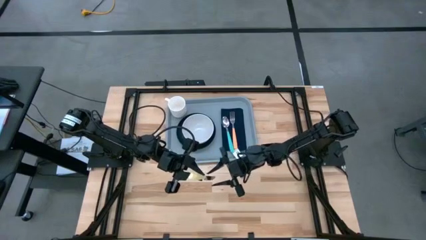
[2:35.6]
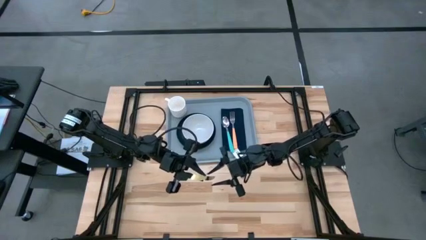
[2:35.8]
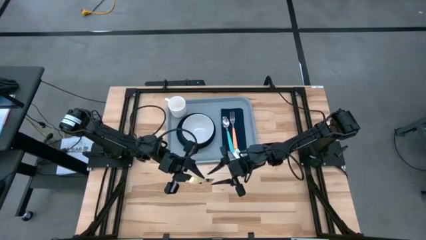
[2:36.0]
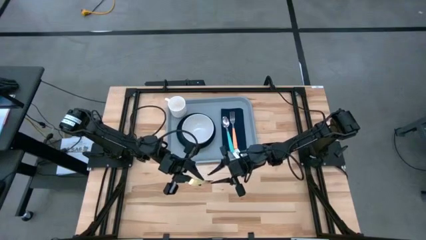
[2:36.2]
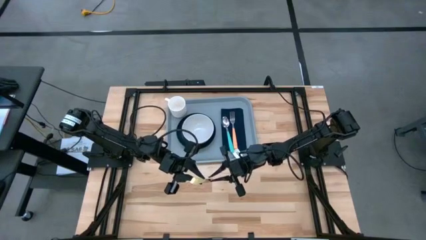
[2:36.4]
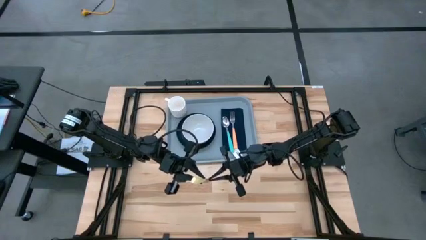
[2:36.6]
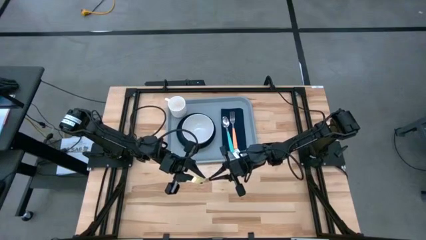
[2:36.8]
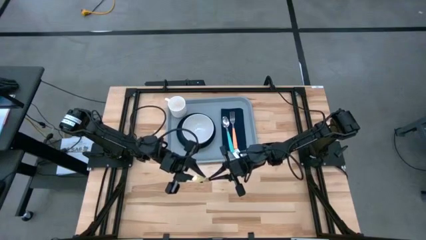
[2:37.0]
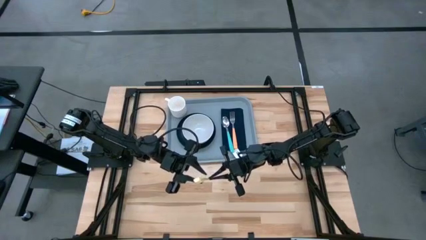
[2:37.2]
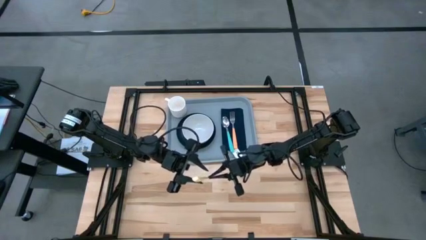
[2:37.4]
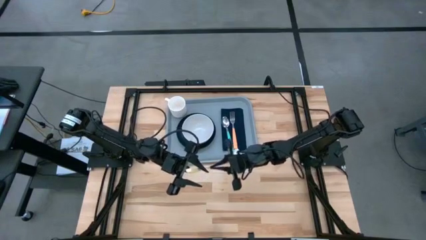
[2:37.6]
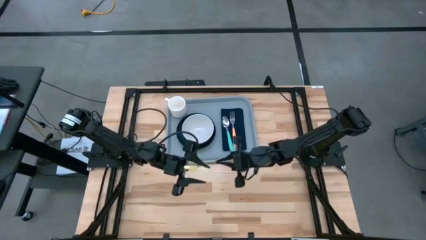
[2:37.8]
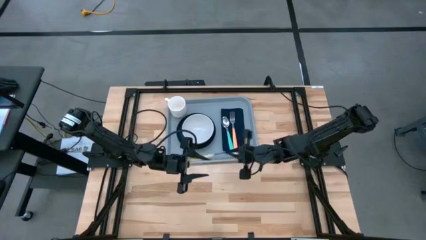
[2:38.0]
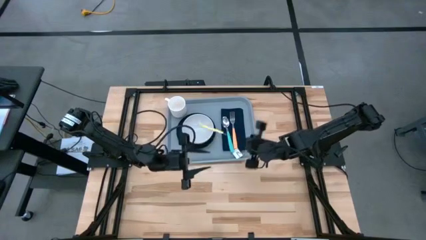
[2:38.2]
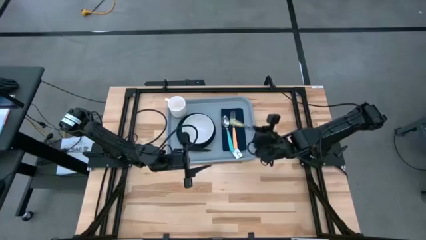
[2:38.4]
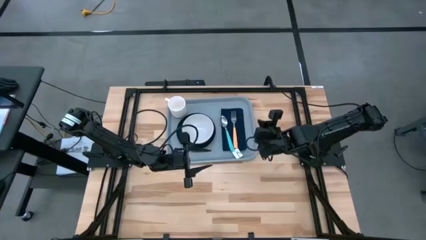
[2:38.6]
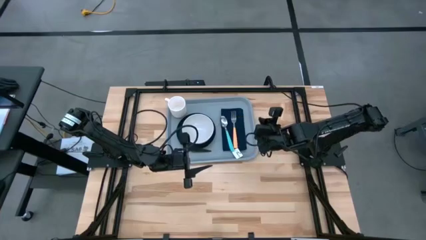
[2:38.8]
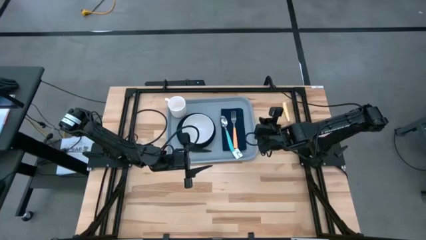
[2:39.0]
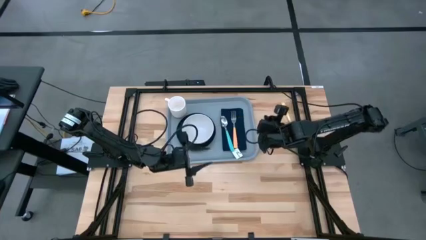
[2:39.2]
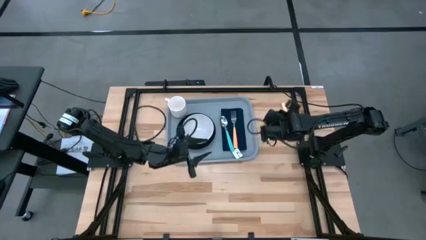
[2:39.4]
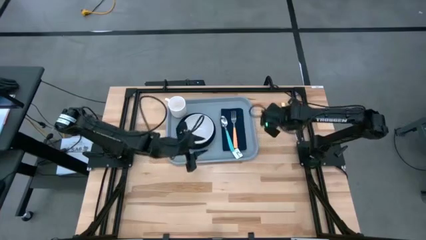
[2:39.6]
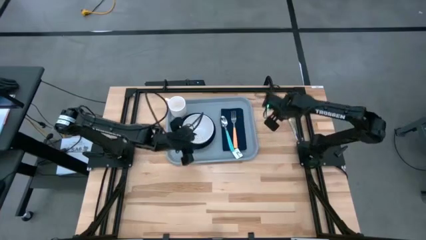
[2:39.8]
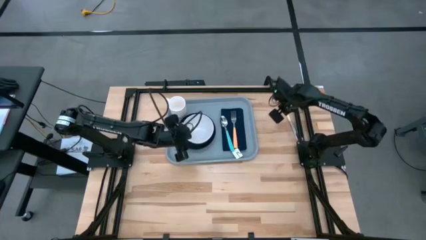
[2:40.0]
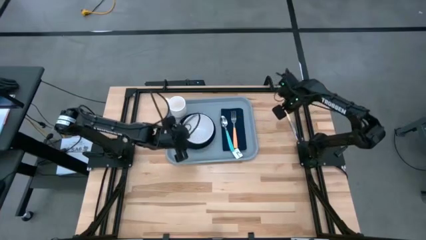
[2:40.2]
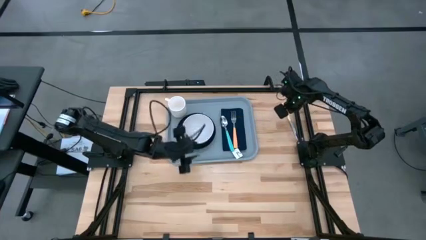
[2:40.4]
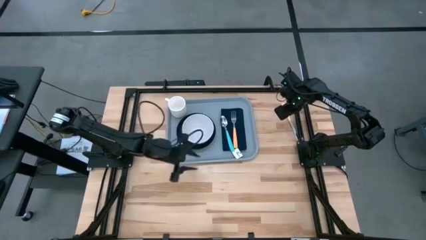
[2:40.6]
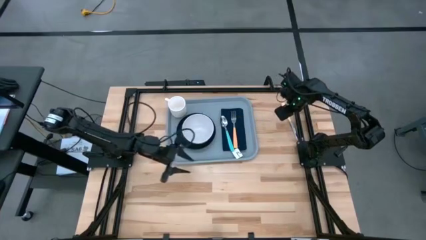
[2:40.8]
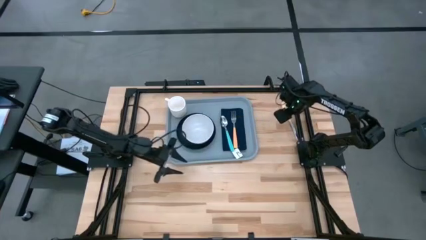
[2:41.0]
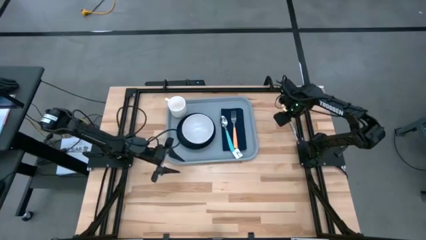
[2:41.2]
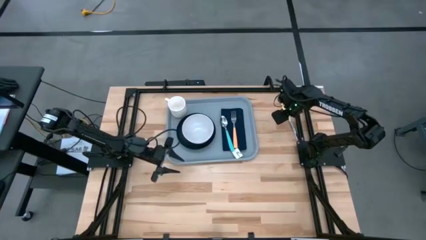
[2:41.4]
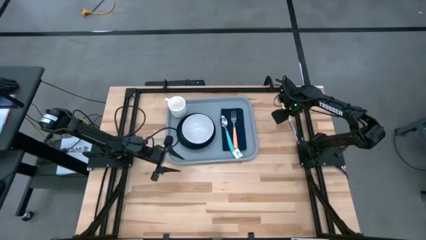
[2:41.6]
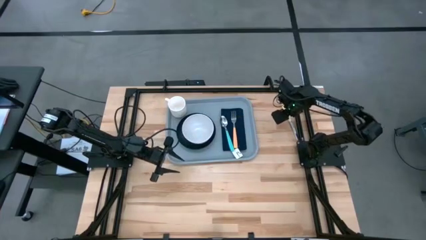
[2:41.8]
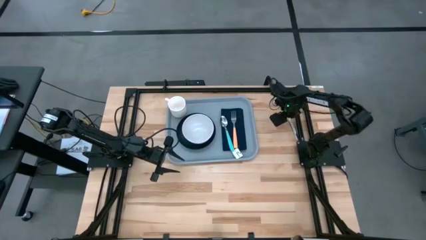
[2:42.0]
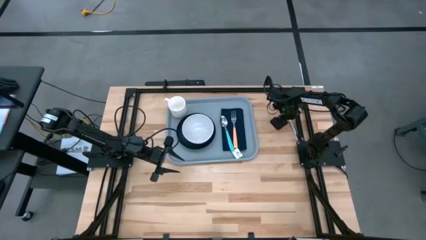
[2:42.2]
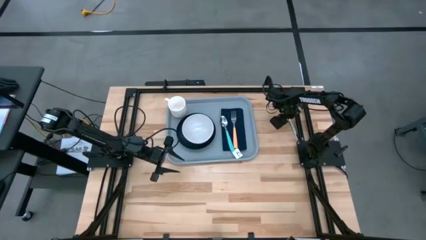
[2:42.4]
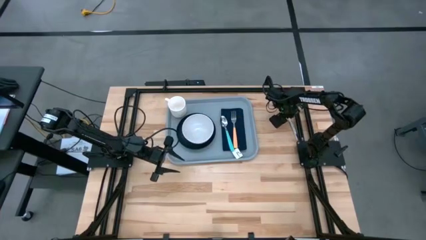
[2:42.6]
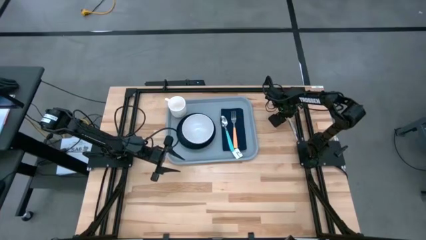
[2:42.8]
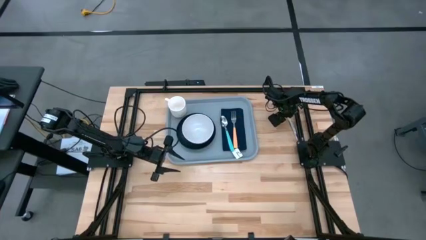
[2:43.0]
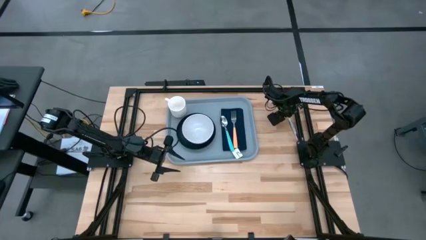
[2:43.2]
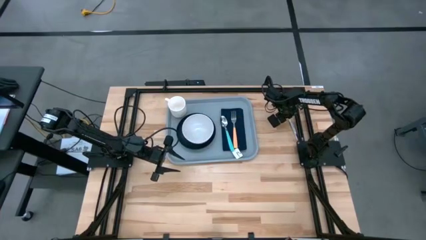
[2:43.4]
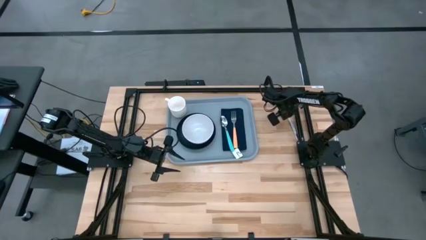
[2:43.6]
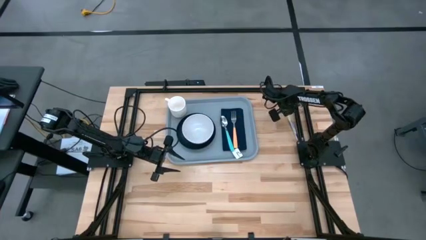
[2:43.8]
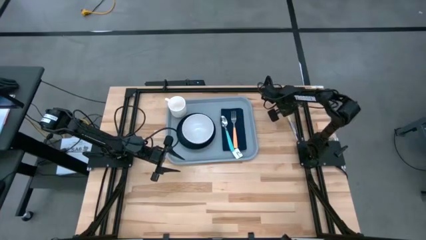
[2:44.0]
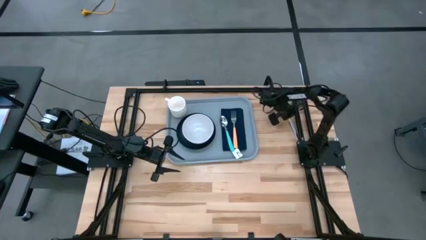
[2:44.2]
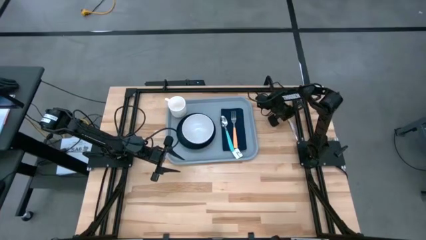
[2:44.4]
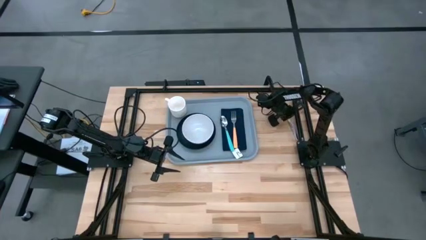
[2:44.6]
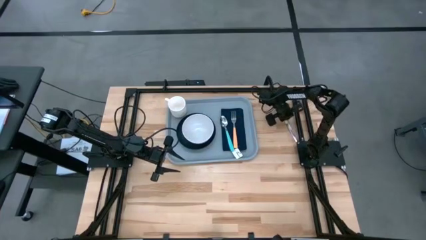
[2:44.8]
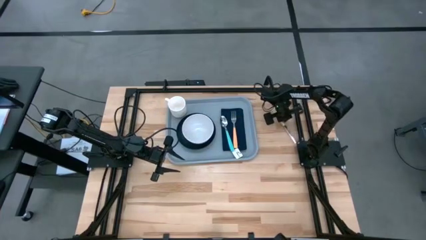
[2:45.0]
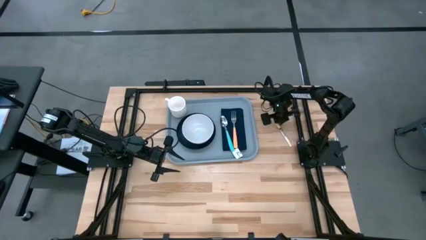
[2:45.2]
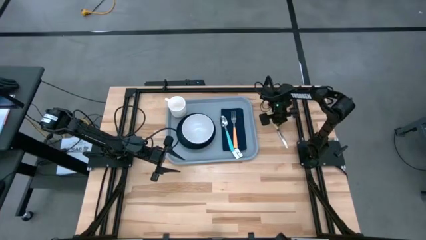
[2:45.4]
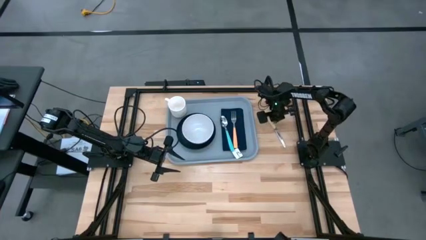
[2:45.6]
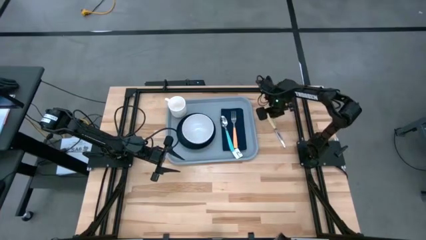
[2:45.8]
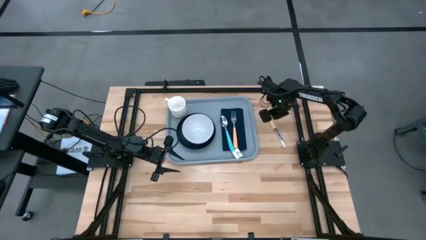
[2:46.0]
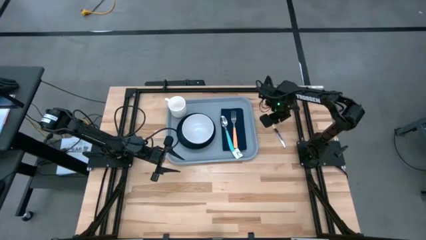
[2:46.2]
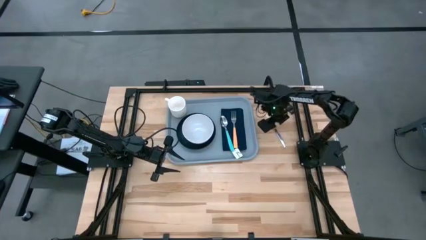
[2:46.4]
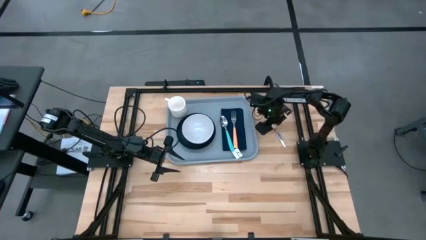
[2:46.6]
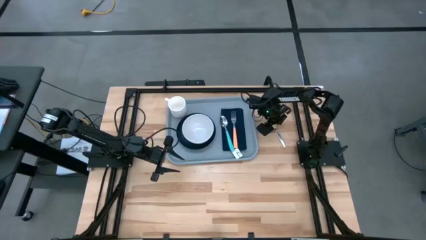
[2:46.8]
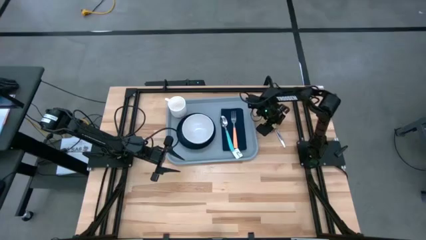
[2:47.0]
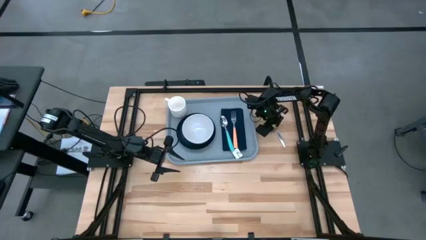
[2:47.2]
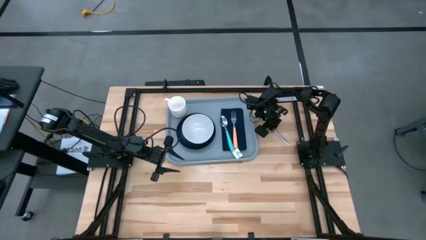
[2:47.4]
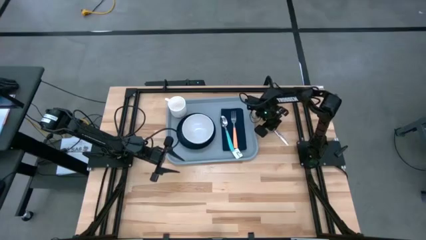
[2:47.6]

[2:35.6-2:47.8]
Task: Set up tray
Put the yellow knife on the black napkin to the right of the orange fork
